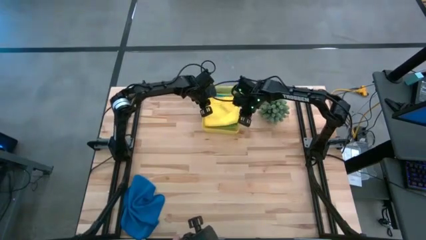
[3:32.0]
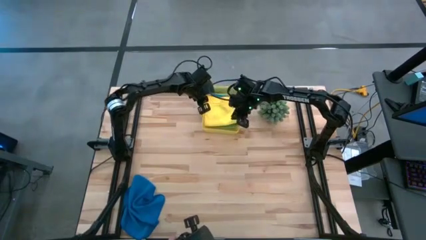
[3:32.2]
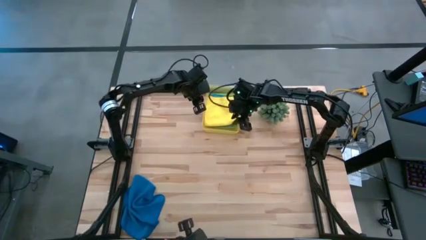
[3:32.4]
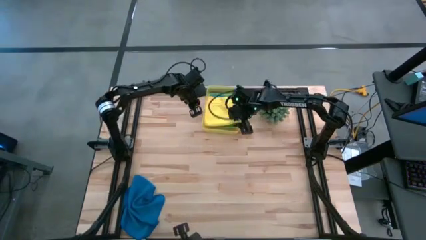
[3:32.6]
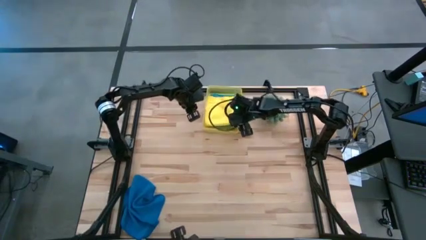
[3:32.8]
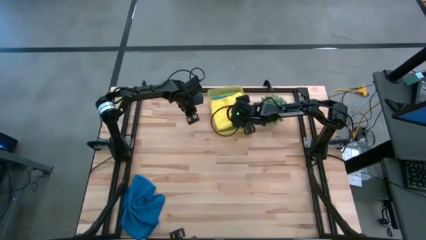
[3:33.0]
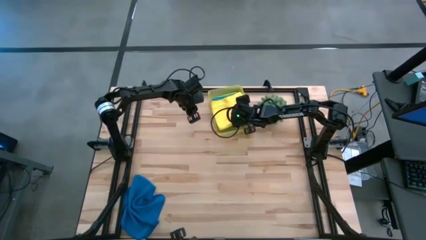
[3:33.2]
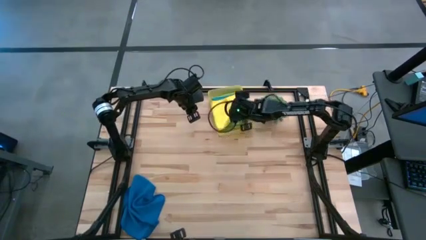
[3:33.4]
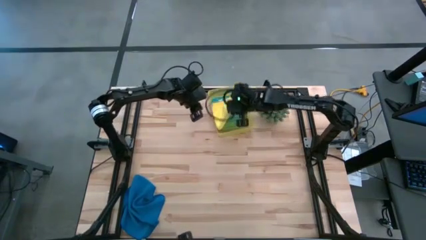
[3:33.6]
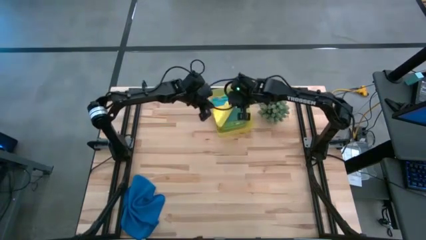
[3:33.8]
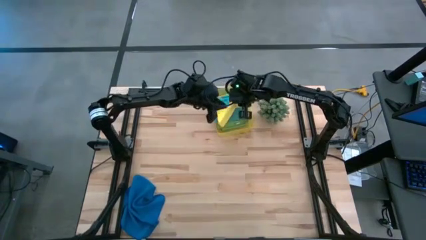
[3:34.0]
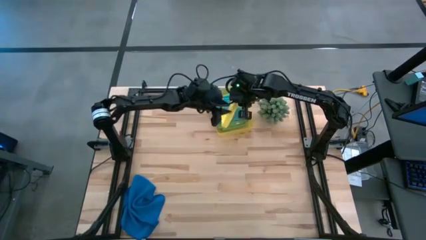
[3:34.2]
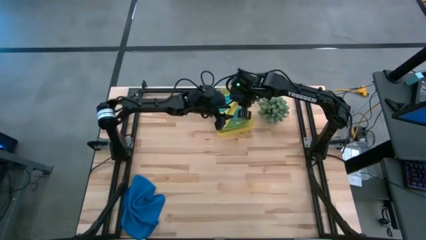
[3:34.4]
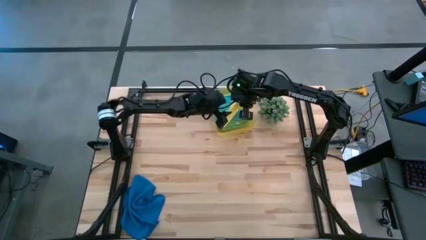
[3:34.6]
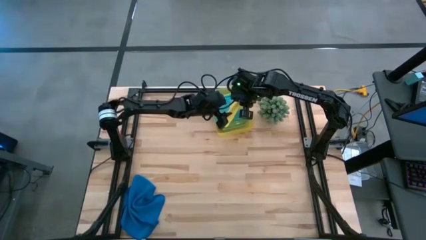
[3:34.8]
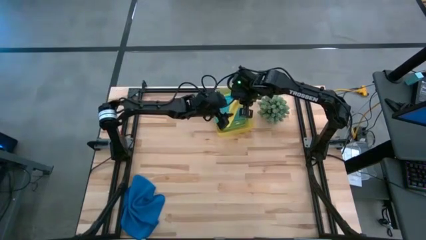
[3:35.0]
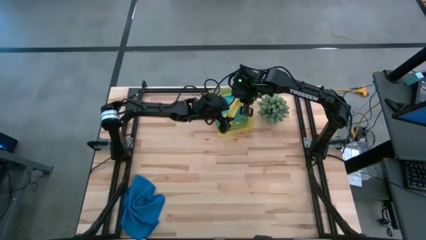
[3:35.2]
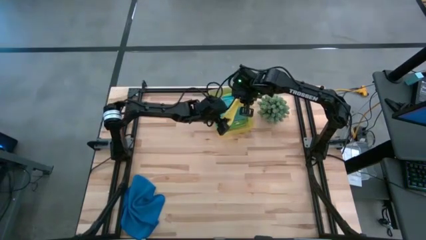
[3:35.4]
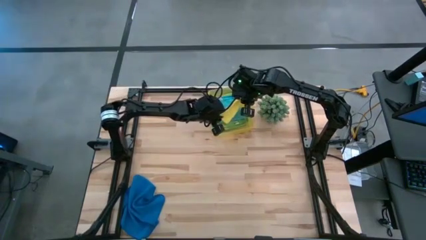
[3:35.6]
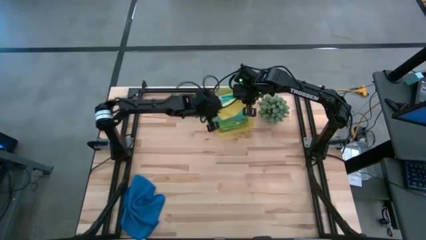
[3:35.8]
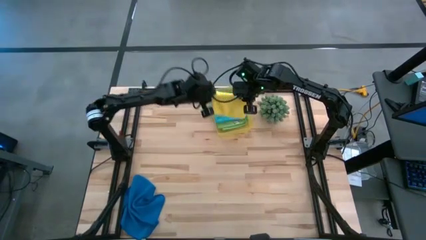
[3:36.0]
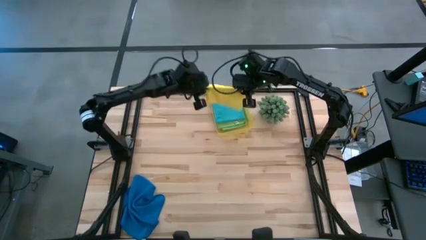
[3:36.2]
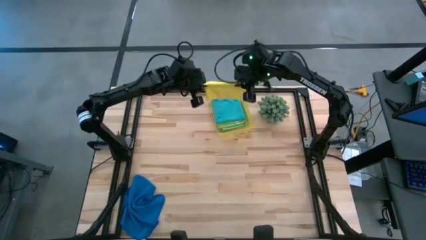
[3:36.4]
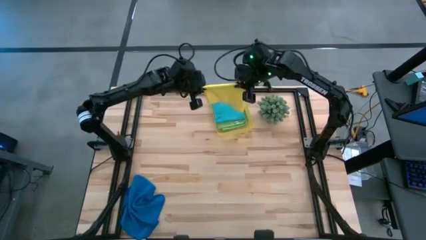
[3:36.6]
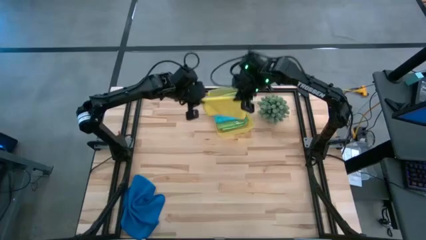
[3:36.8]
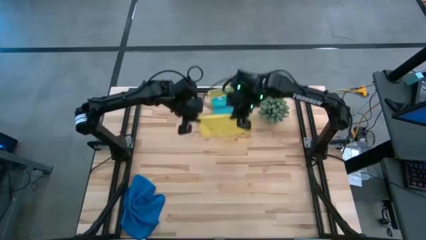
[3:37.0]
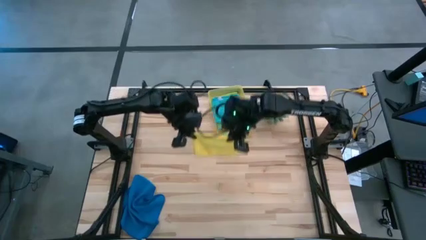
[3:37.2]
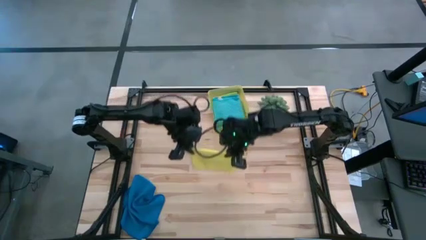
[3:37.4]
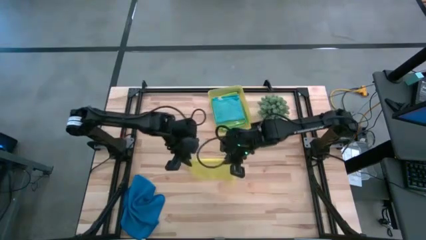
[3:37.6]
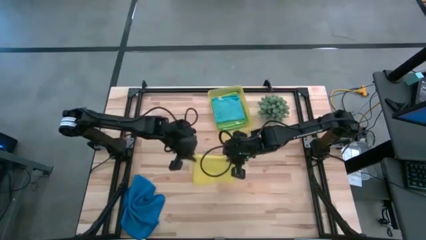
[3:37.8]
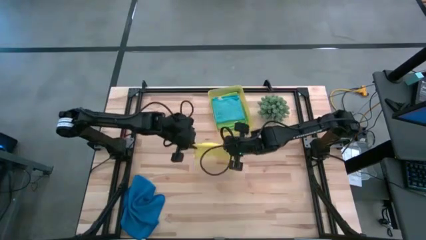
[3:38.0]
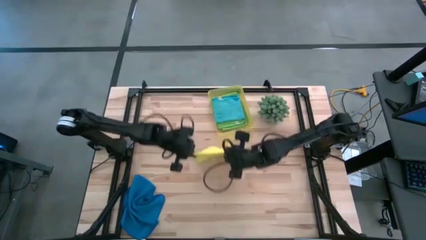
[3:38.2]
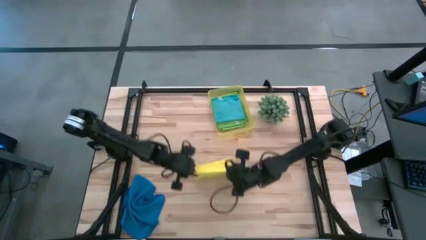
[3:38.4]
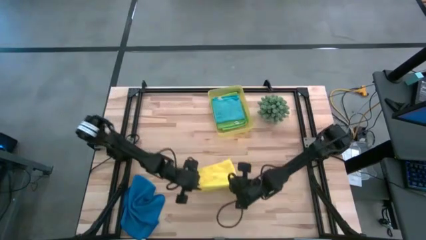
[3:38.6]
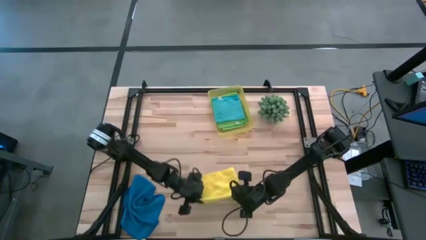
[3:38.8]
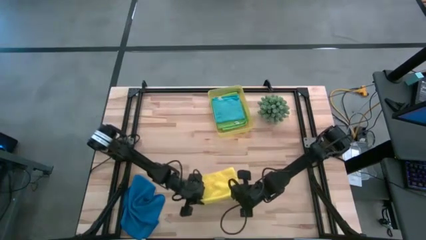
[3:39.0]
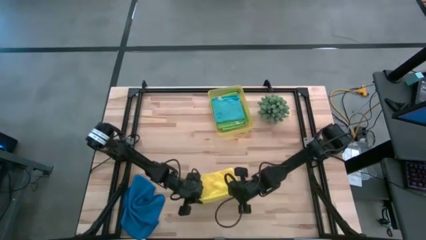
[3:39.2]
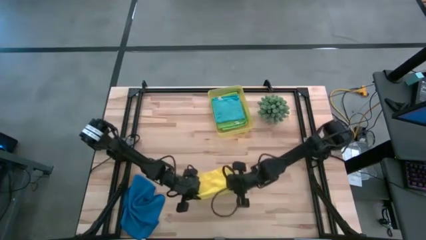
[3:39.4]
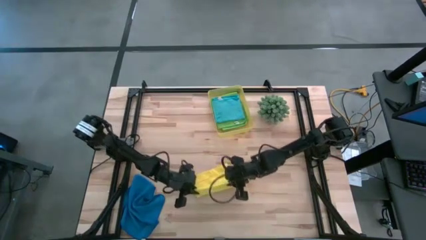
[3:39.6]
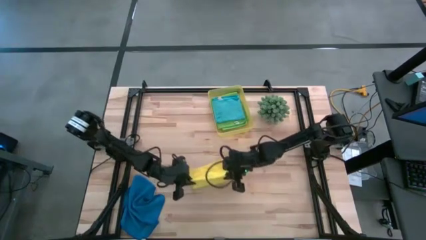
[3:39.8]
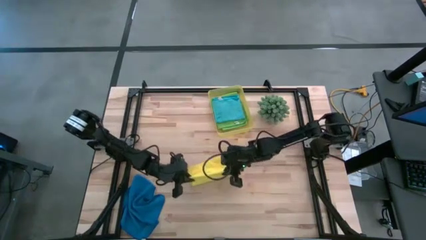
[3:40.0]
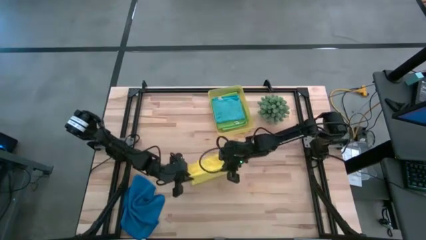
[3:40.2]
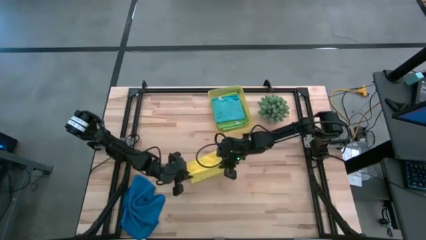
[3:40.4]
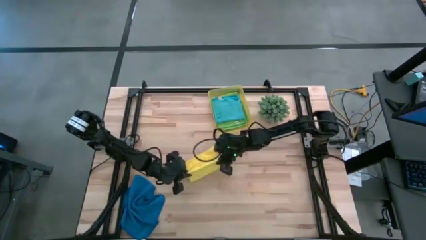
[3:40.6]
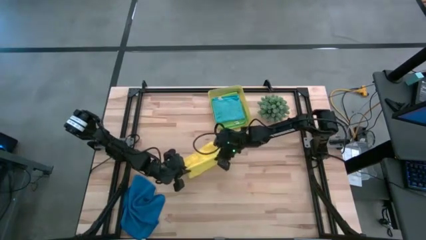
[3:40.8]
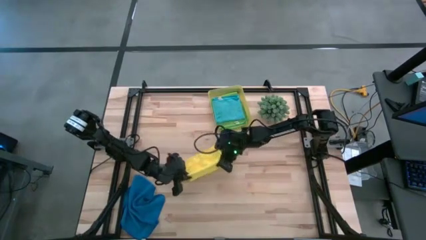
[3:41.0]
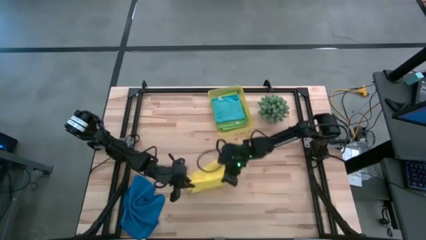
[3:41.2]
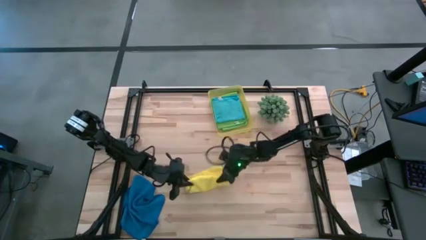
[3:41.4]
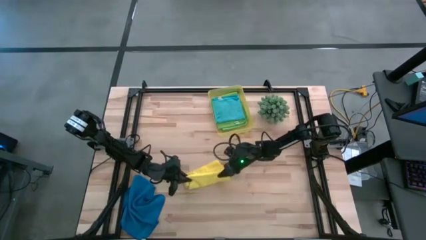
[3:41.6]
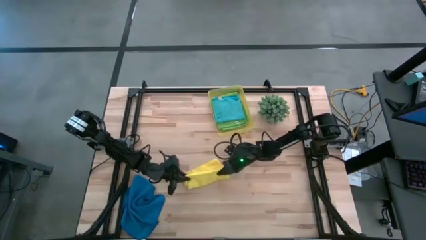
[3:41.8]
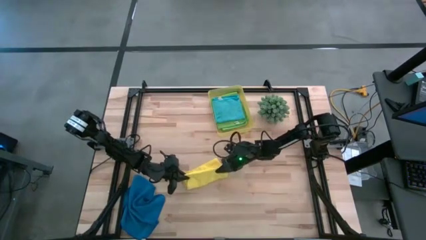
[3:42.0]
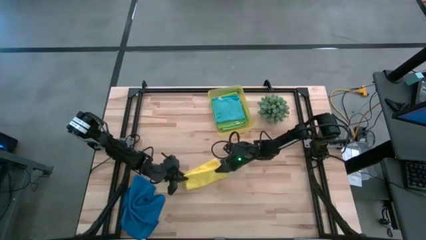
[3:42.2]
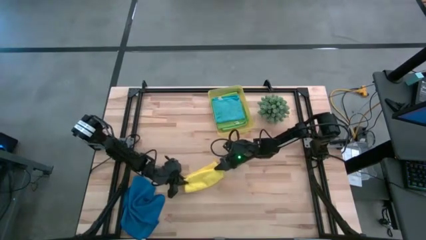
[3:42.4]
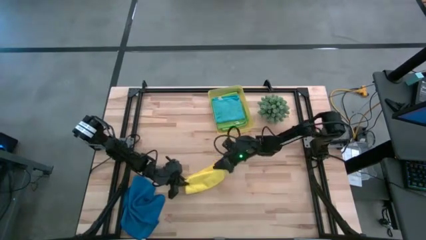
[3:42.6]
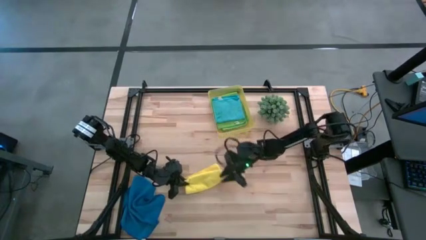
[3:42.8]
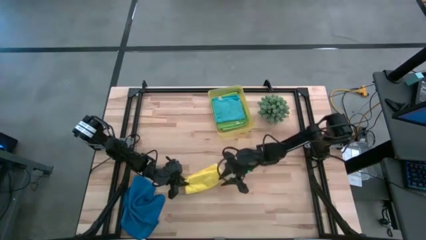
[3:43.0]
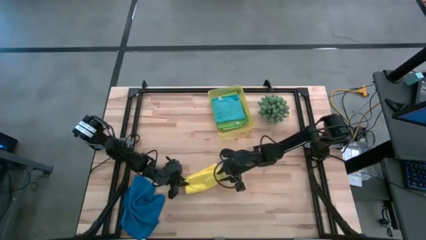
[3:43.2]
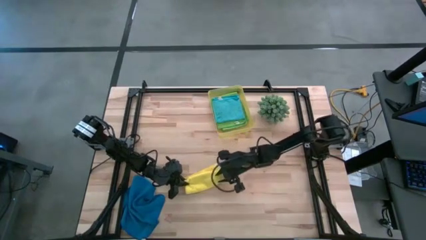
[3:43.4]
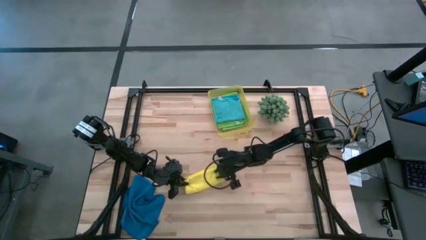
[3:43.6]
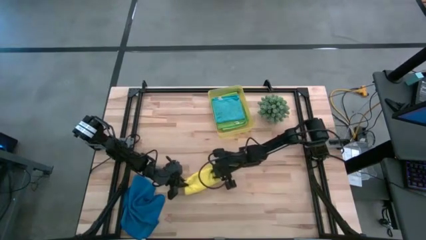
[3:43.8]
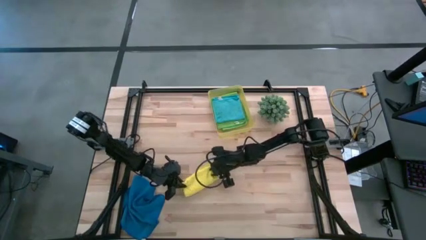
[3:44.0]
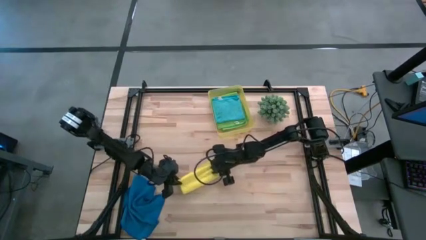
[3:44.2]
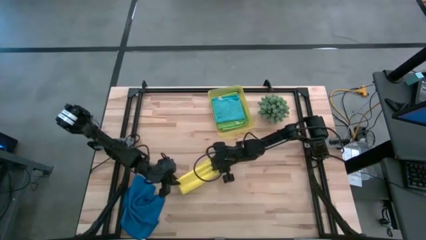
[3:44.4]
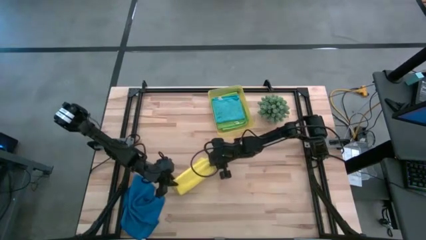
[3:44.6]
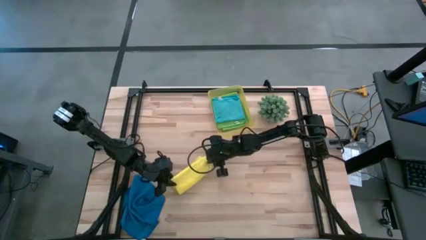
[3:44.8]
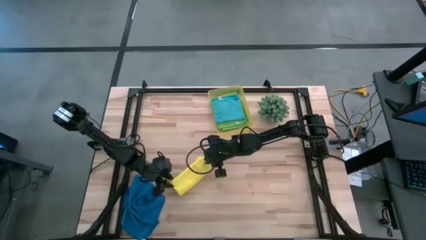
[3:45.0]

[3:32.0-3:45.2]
Task: Fold microfiber towels
Fold the yellow microfiber cloth

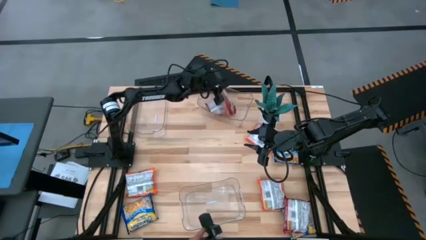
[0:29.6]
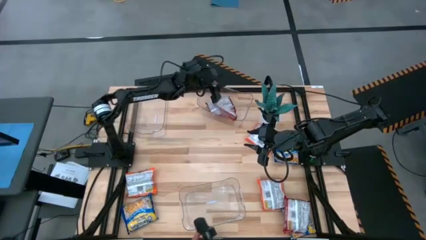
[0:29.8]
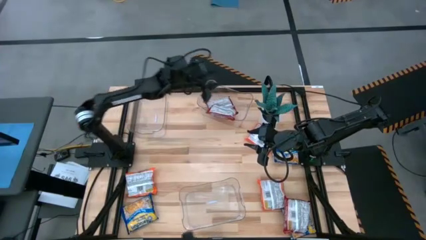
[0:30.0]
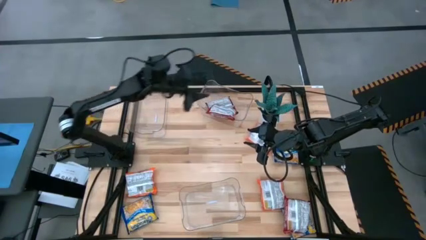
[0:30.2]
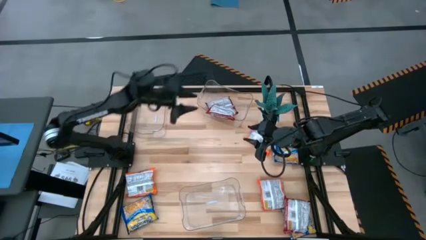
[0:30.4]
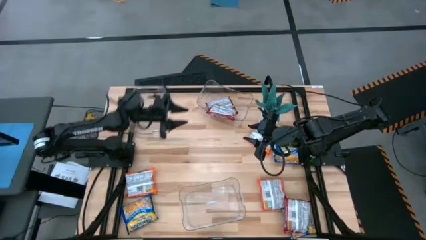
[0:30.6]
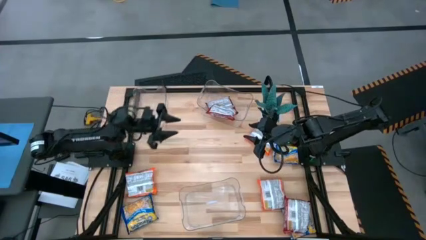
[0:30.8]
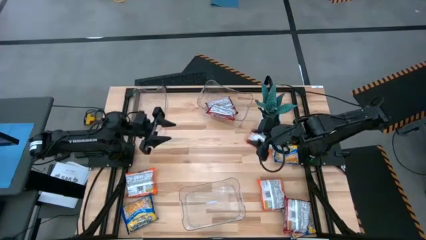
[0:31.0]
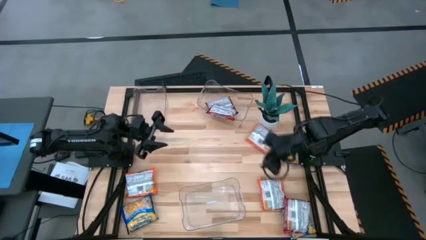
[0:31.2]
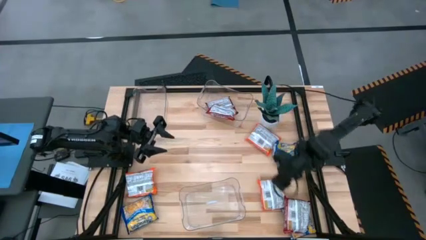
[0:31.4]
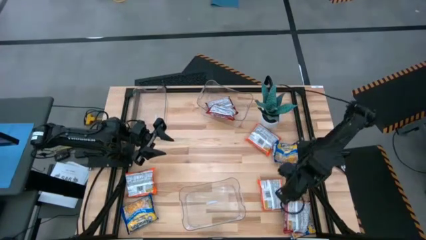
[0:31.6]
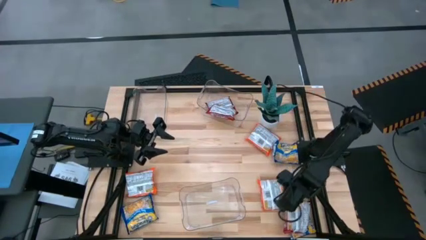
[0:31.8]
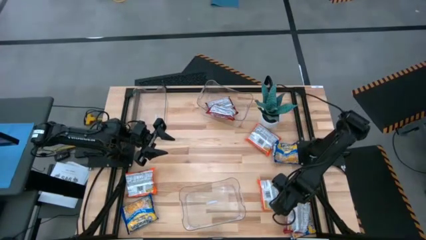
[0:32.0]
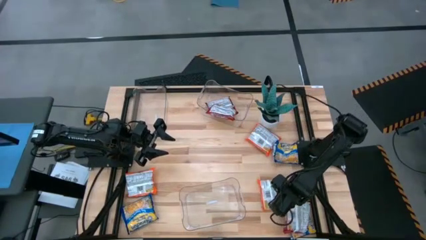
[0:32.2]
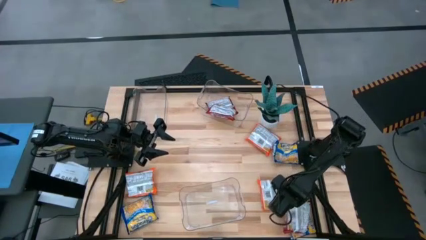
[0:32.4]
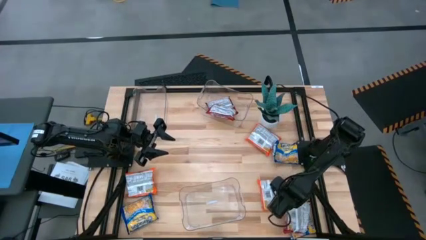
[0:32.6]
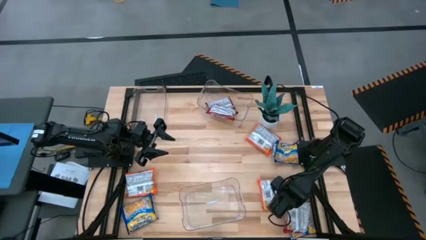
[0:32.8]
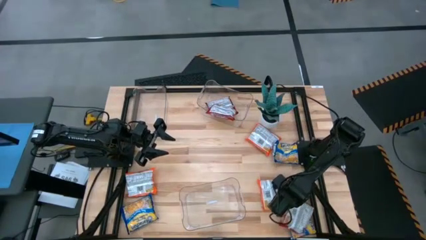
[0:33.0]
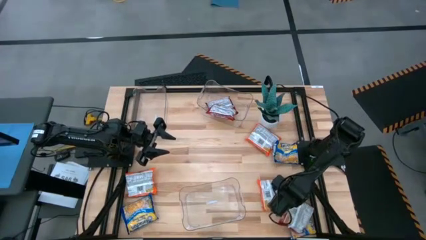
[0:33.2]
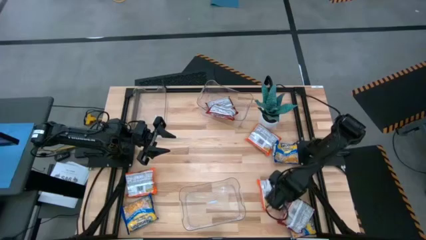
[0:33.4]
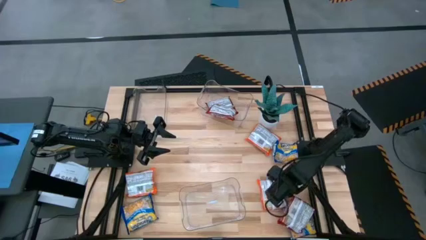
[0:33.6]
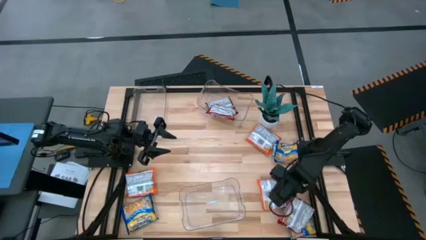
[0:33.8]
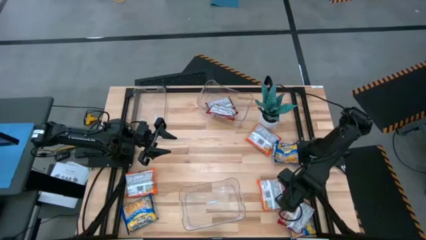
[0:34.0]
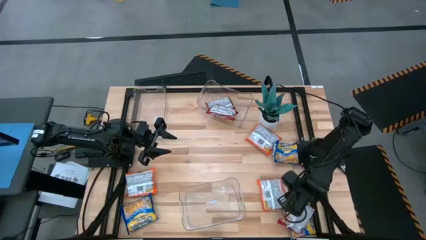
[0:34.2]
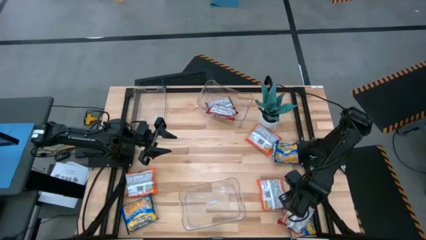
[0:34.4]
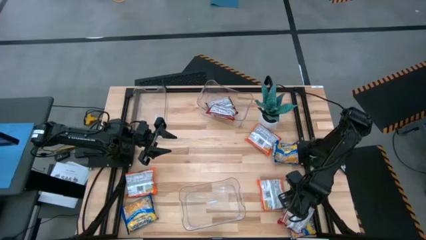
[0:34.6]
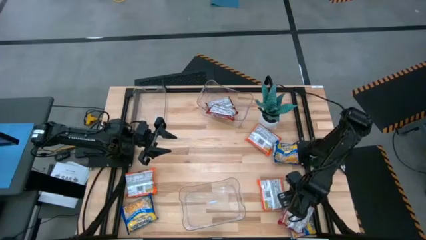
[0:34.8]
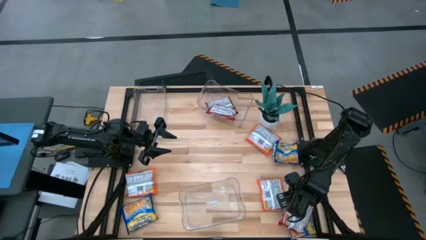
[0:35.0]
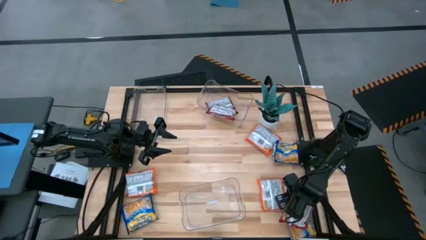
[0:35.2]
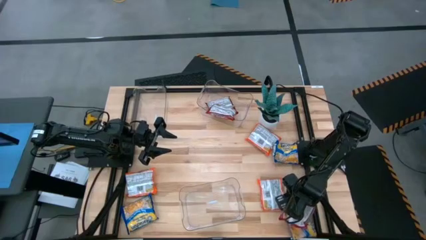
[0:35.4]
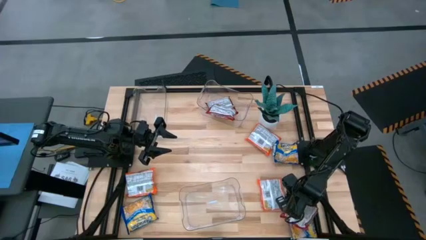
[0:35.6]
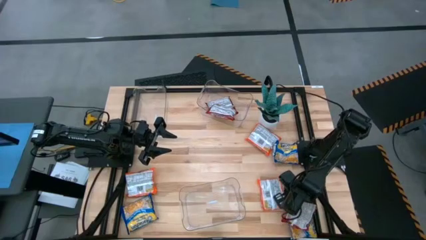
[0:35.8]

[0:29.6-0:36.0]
Task: Sort Maruchan noodles
Put the red noodle pack into the top right transparent bin
